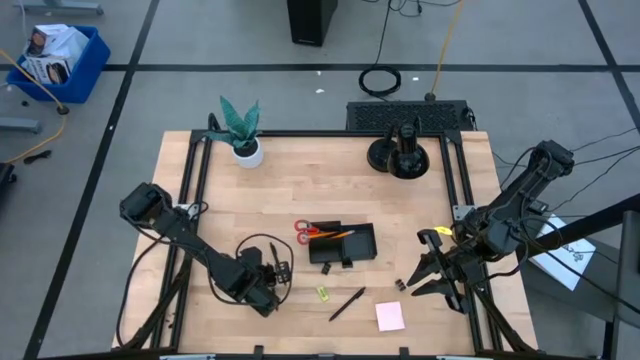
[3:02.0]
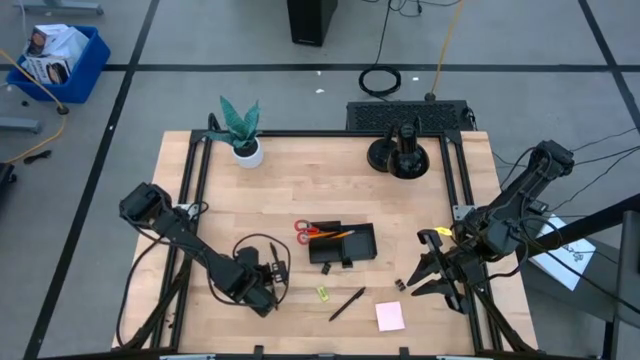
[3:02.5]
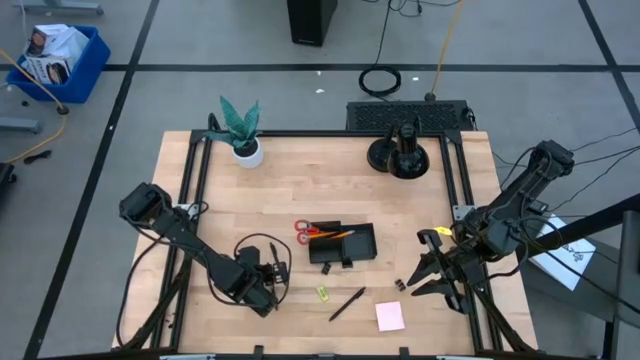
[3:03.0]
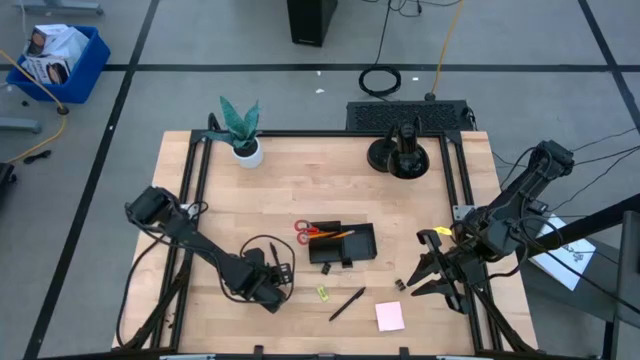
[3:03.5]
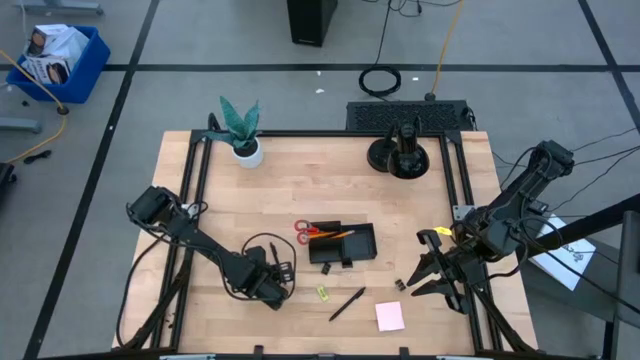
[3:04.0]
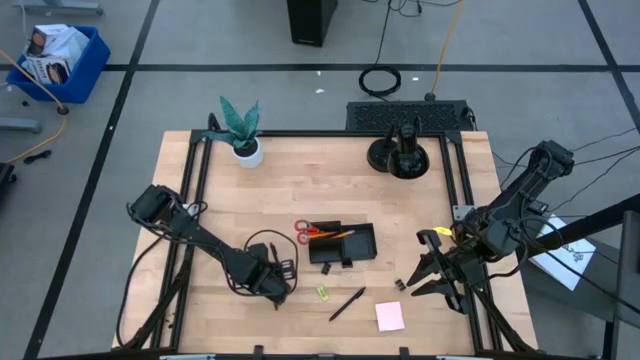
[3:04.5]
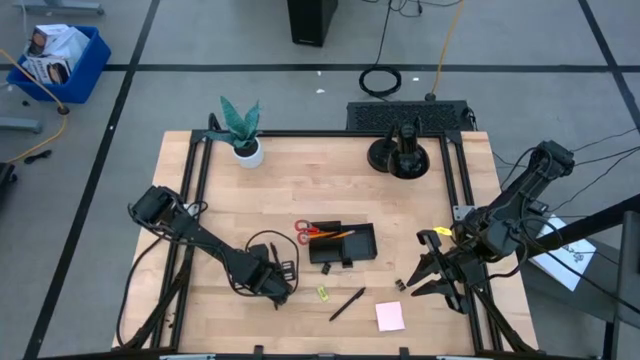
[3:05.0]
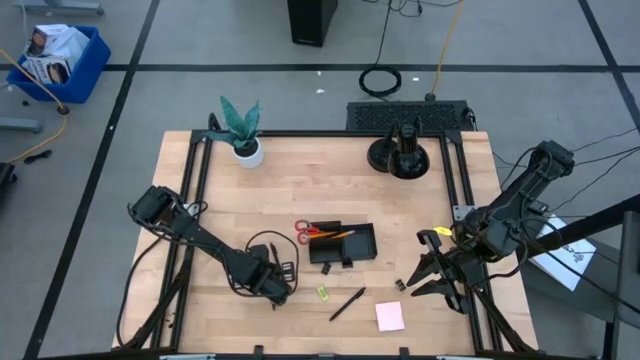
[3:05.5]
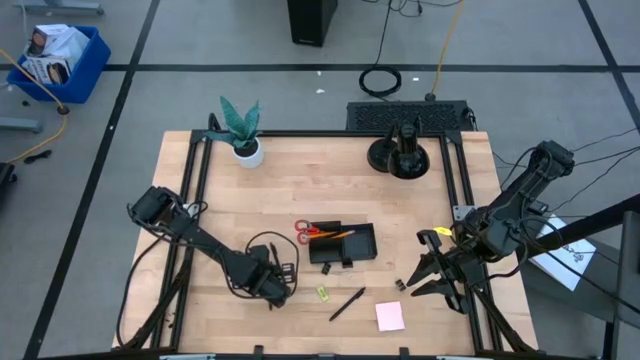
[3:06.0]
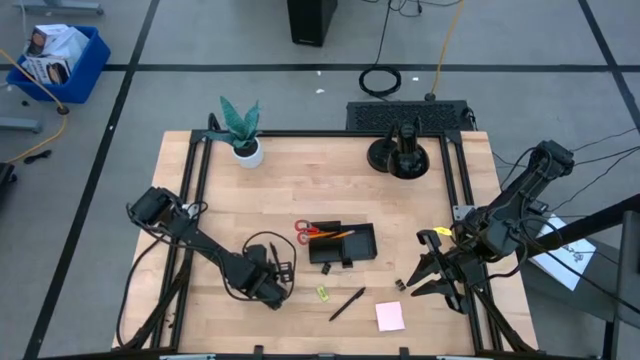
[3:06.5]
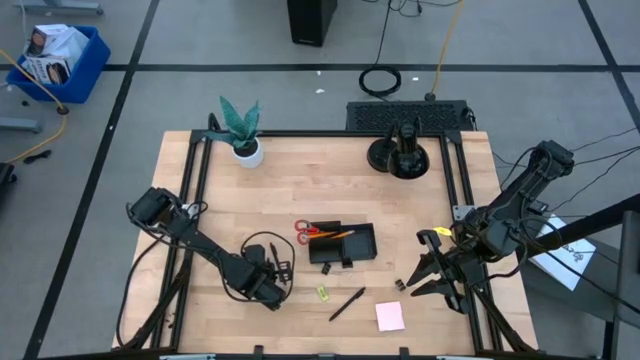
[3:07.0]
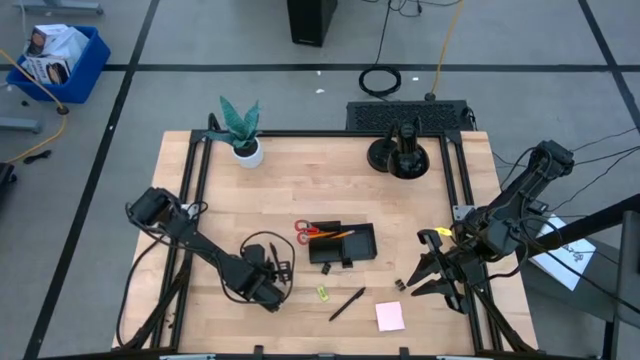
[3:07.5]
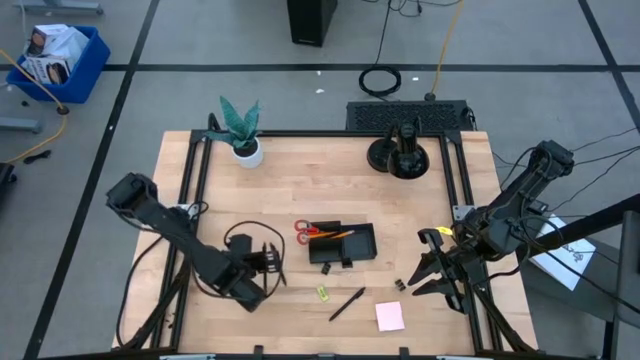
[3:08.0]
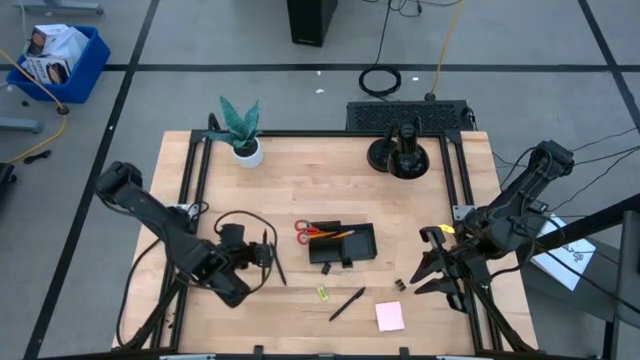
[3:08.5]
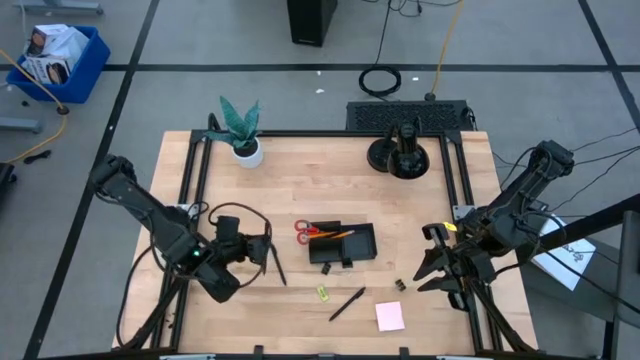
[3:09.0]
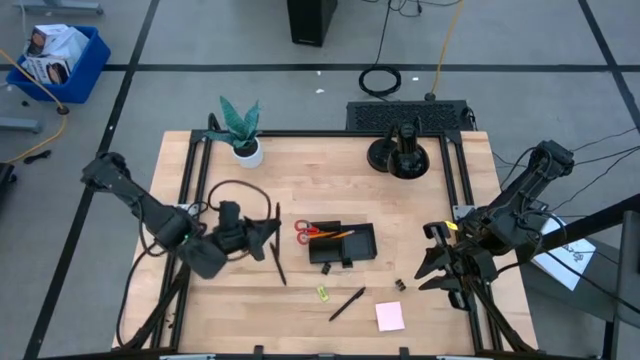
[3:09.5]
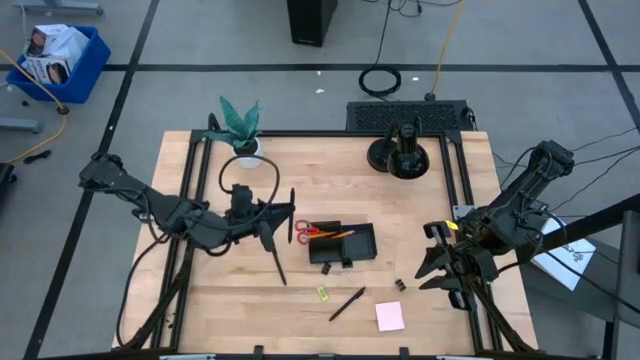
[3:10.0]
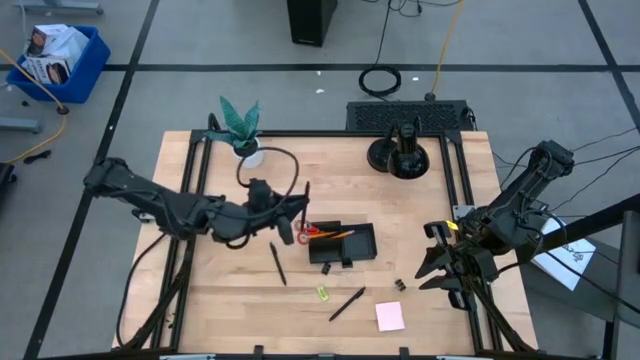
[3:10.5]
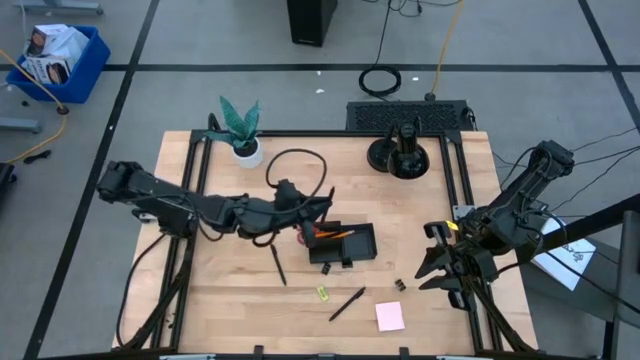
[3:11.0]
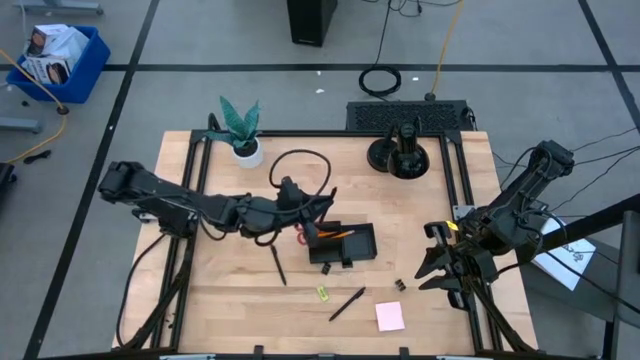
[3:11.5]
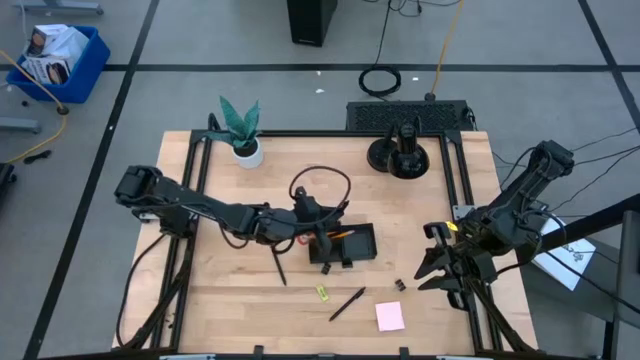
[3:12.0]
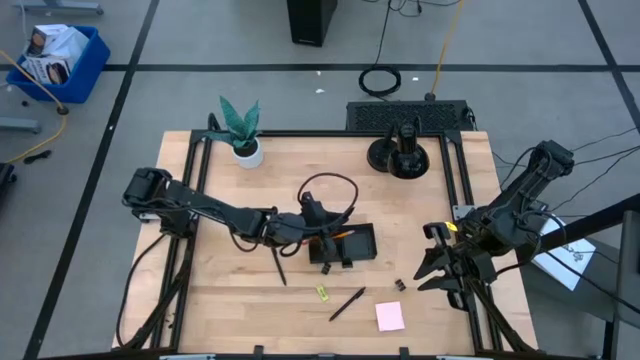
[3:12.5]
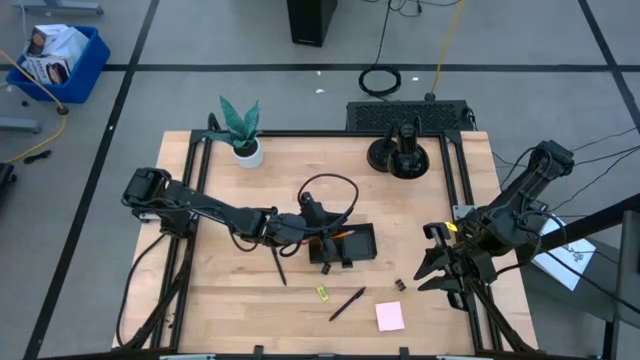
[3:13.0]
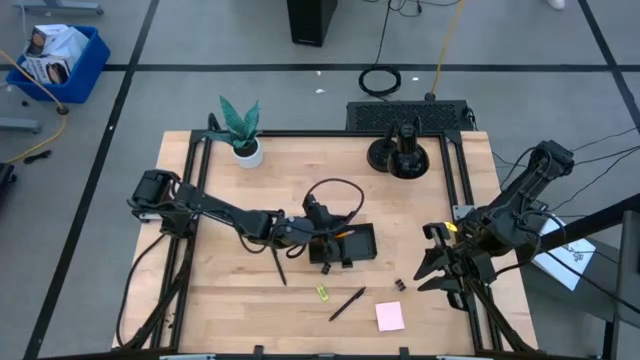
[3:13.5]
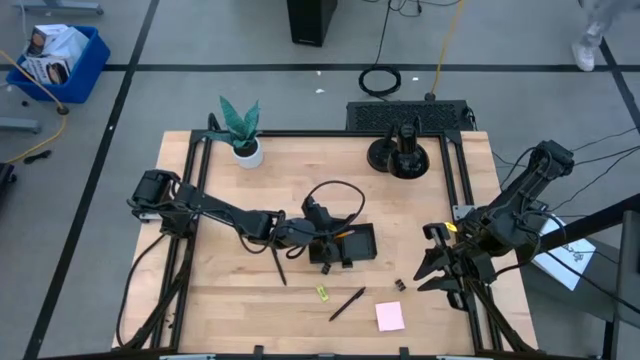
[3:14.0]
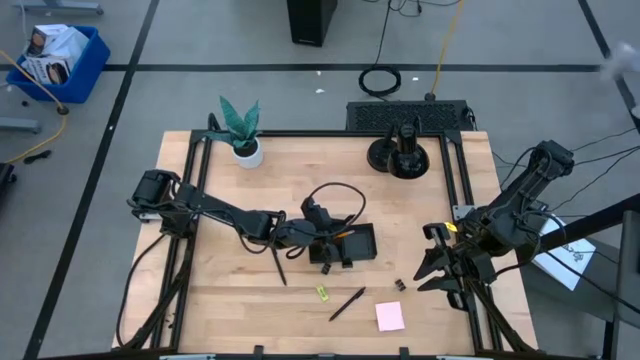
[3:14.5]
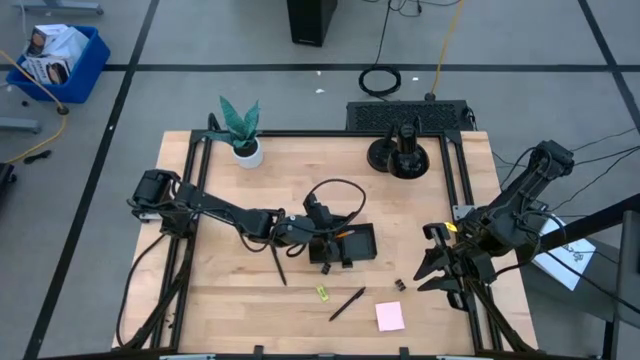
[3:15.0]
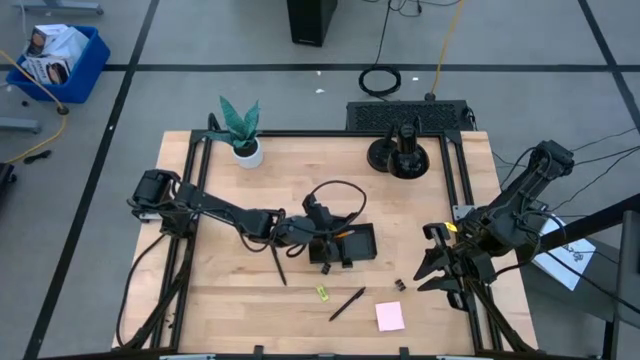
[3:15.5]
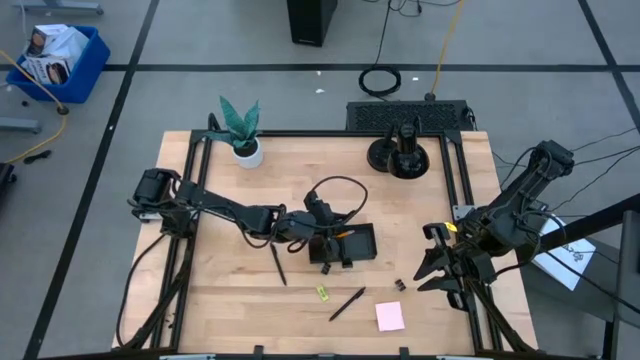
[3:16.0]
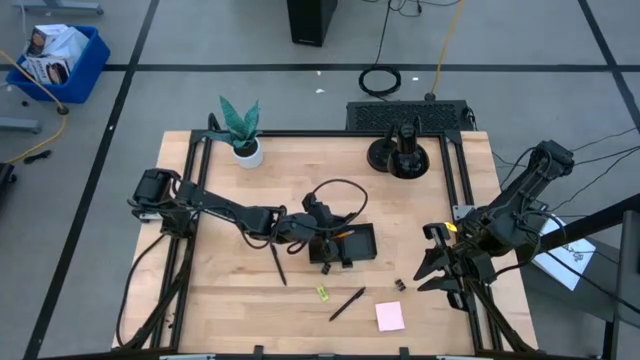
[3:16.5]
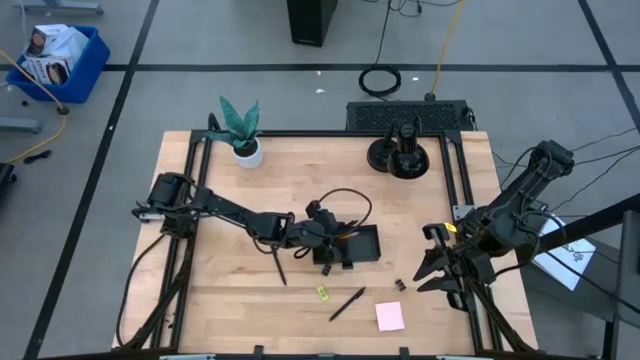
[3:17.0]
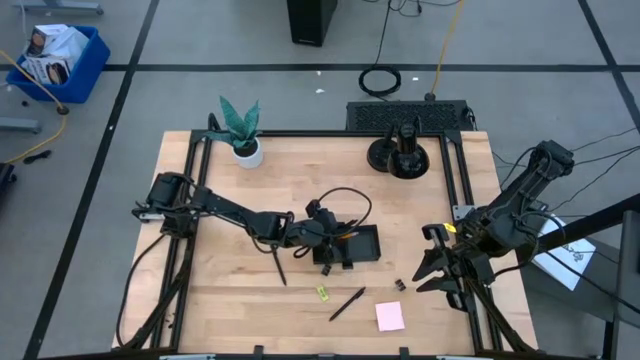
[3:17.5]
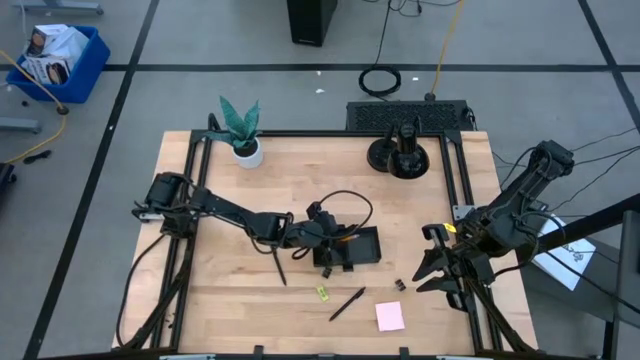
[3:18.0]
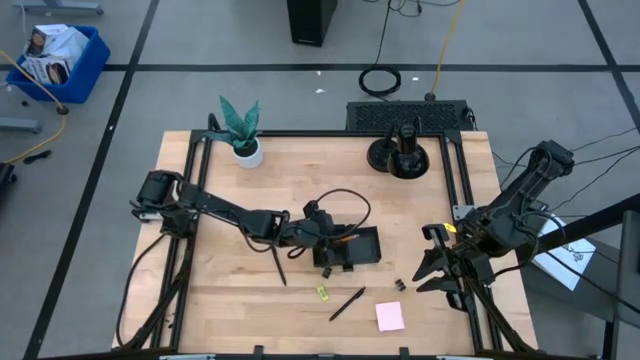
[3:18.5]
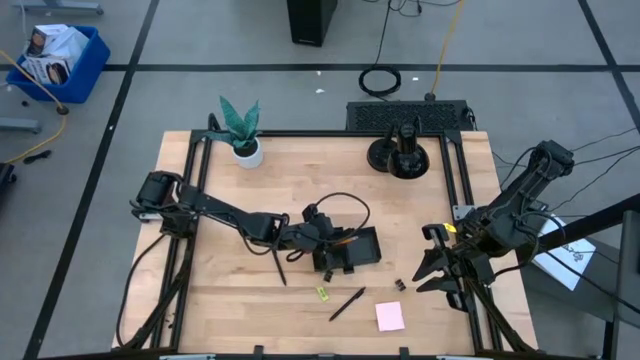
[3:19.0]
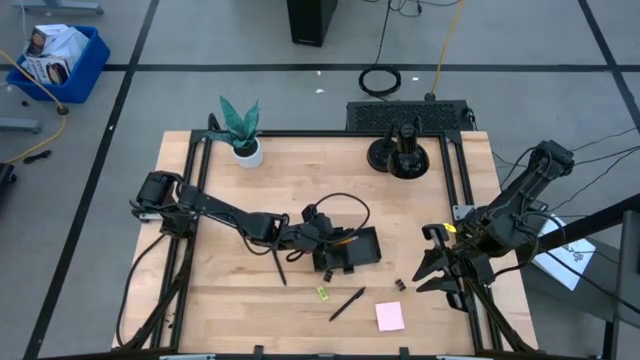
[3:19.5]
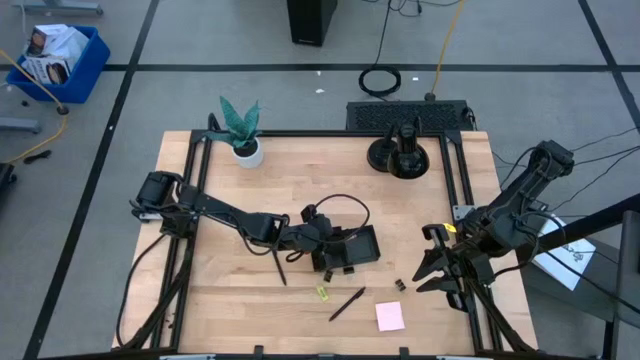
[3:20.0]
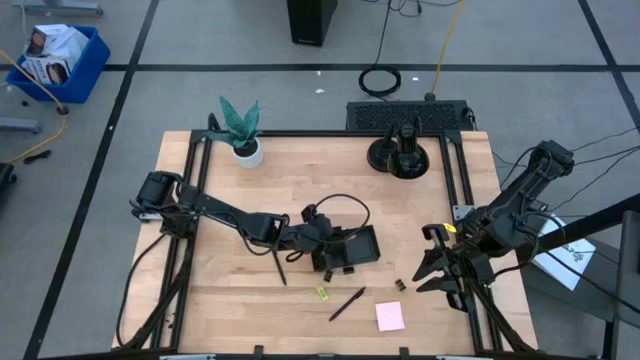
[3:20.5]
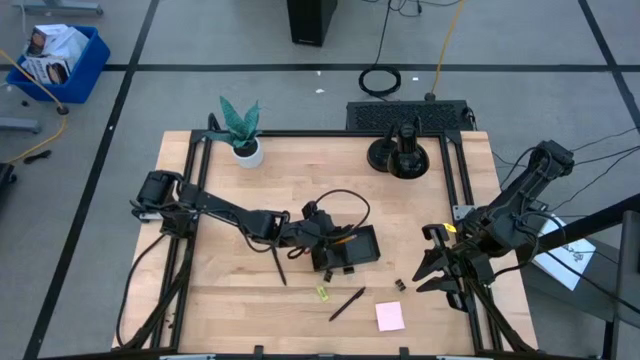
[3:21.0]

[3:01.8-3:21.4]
Task: Pick and place office supplies into organizer
Put the bottom left black pen into the black desk organizer

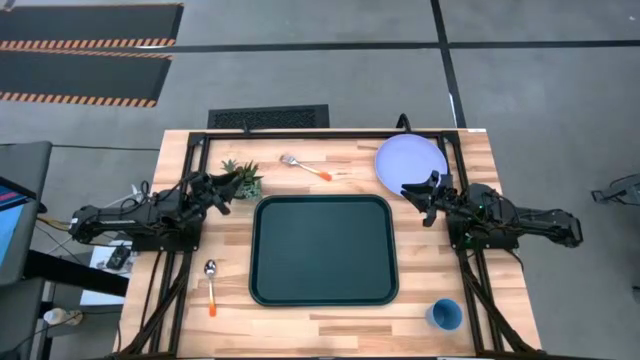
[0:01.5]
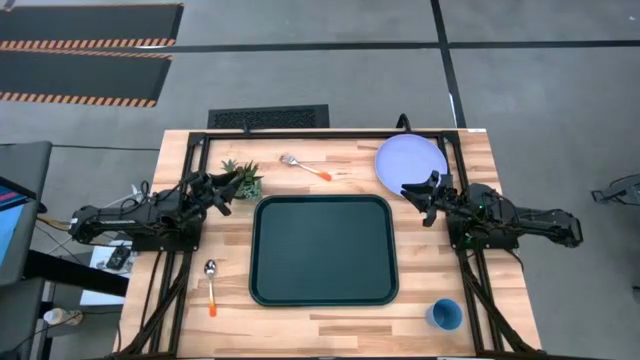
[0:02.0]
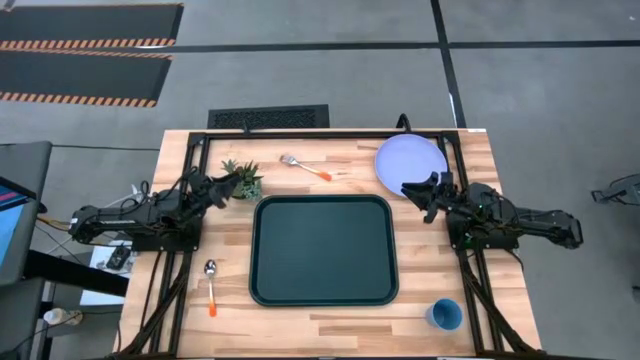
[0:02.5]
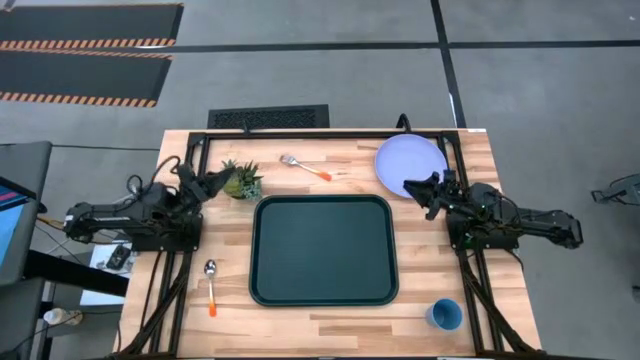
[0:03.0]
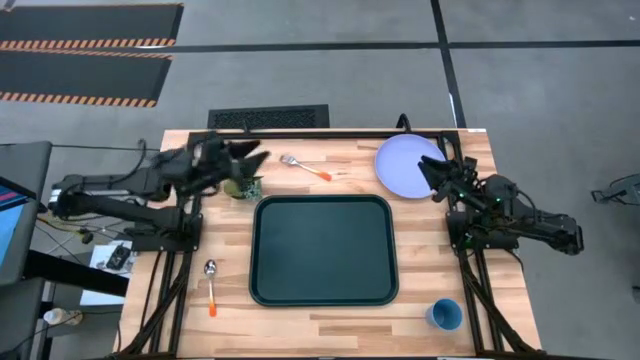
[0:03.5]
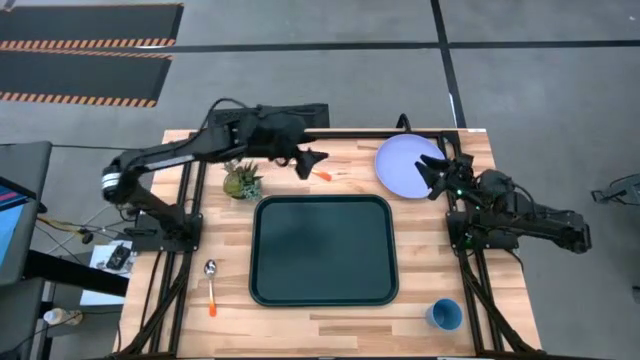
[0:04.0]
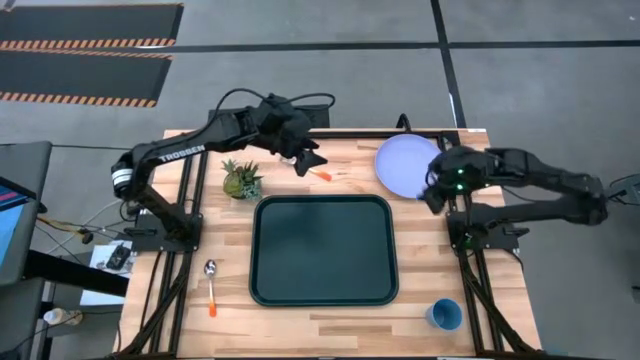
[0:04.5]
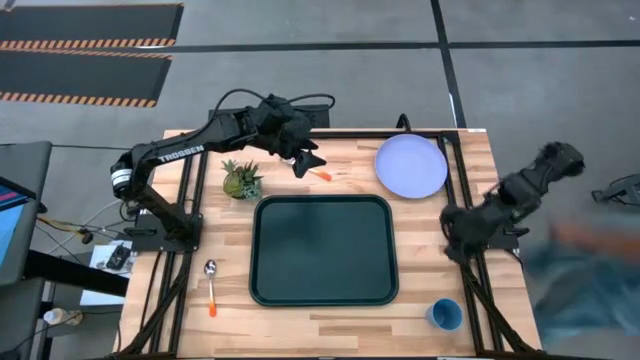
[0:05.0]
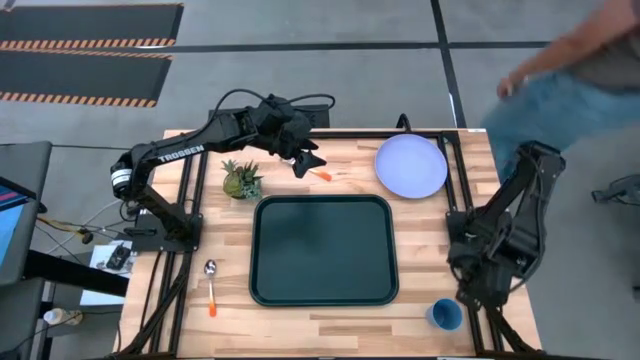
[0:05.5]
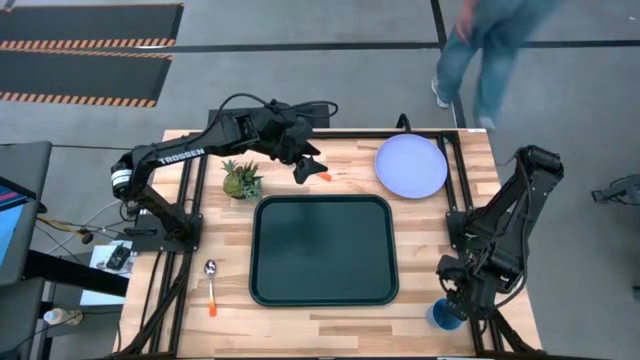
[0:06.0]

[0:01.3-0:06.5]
Task: Pick and place plate/cup/fork/spoon on tray
Put the blue cup on the top left of the black tray
